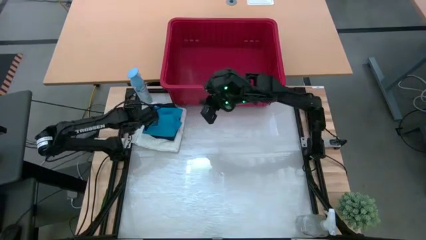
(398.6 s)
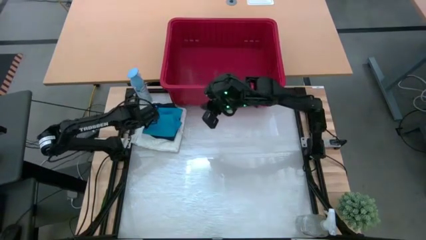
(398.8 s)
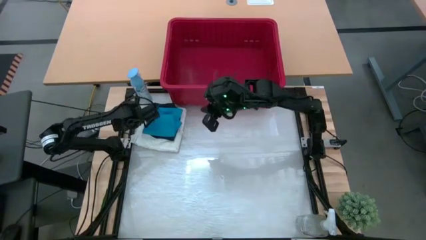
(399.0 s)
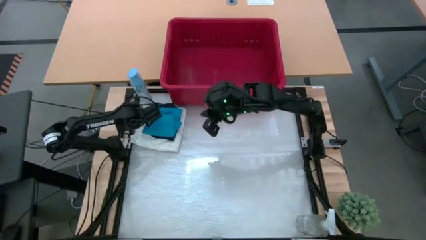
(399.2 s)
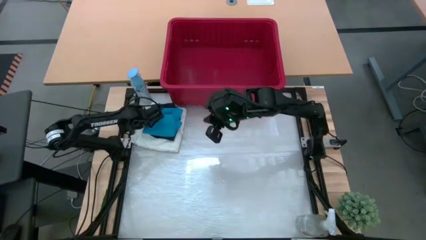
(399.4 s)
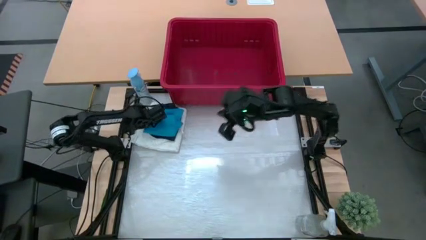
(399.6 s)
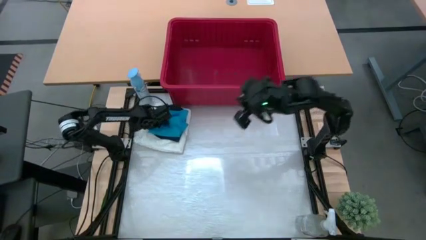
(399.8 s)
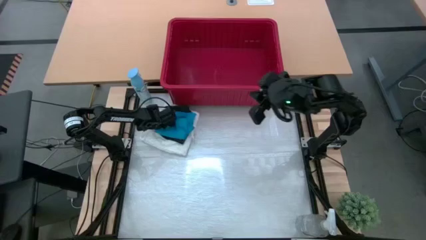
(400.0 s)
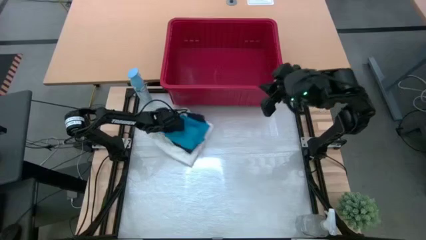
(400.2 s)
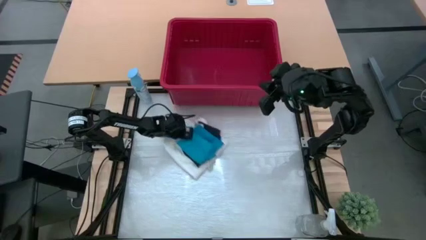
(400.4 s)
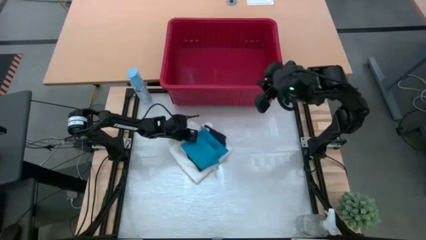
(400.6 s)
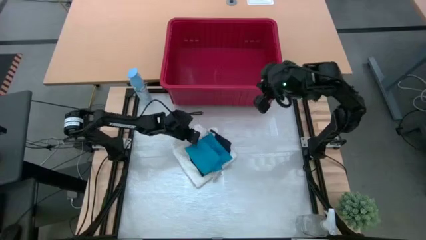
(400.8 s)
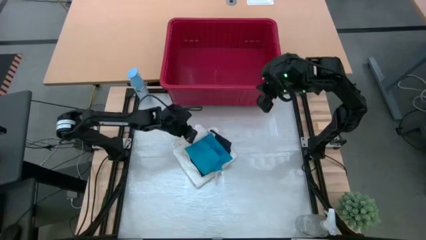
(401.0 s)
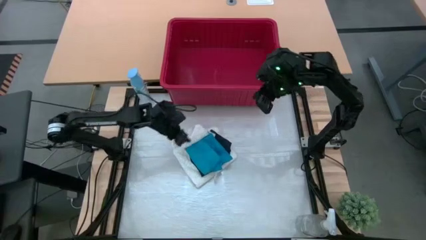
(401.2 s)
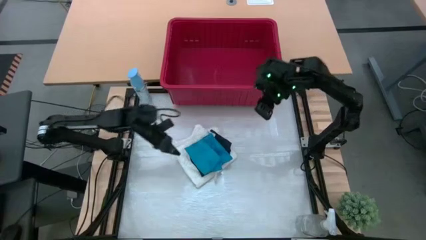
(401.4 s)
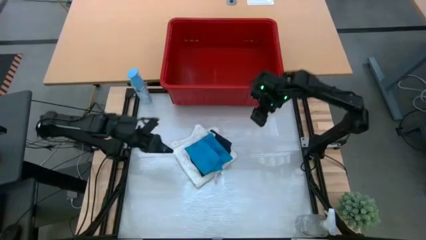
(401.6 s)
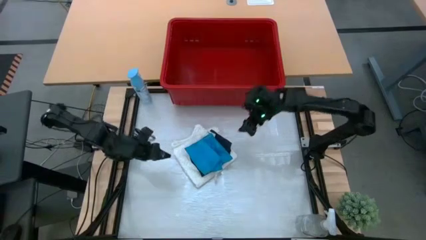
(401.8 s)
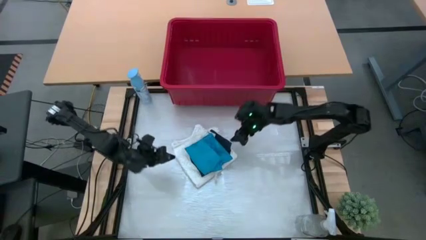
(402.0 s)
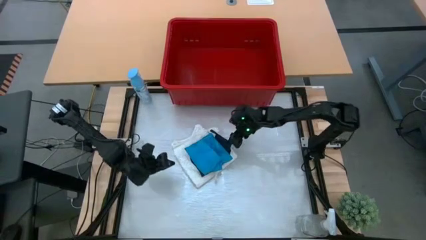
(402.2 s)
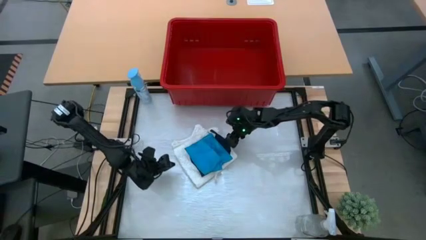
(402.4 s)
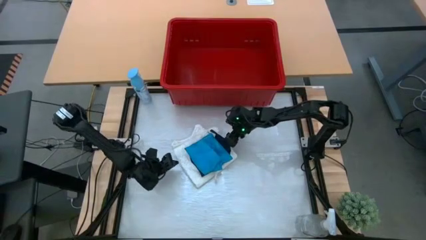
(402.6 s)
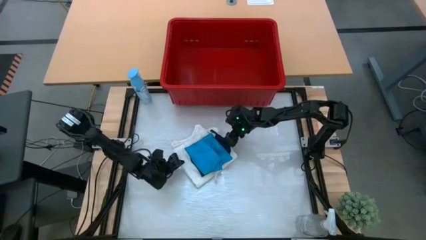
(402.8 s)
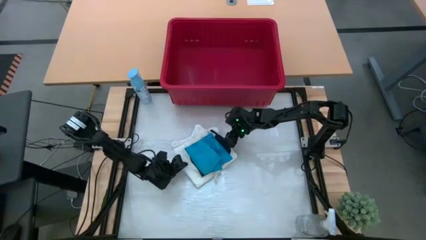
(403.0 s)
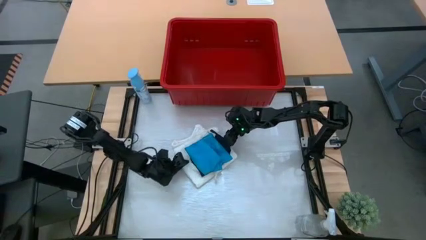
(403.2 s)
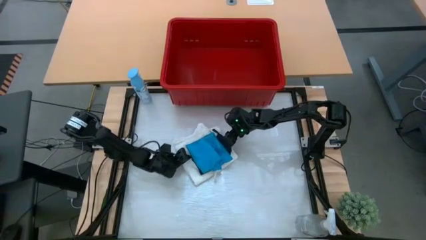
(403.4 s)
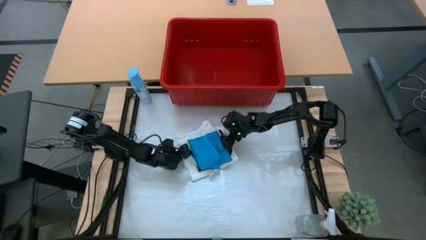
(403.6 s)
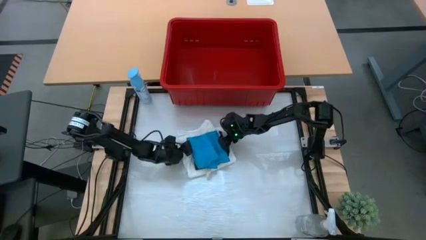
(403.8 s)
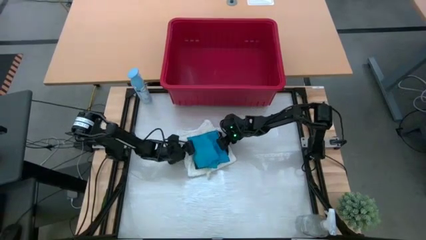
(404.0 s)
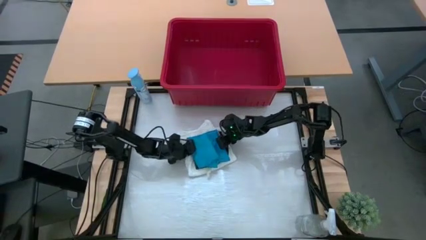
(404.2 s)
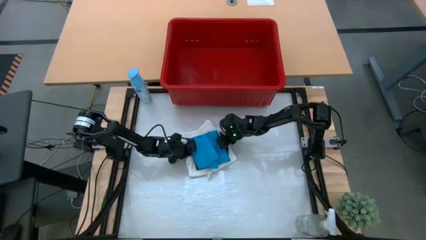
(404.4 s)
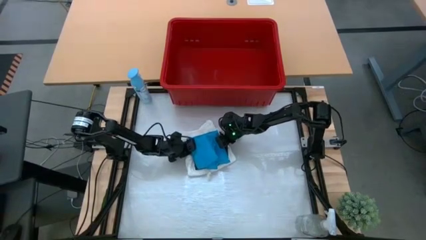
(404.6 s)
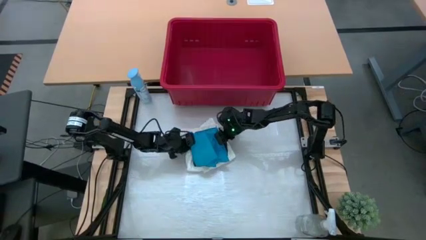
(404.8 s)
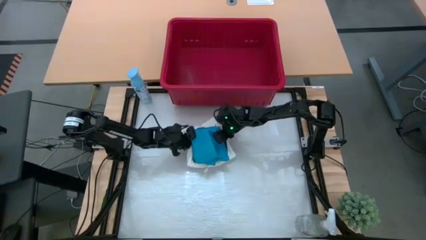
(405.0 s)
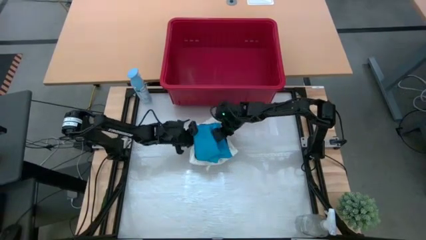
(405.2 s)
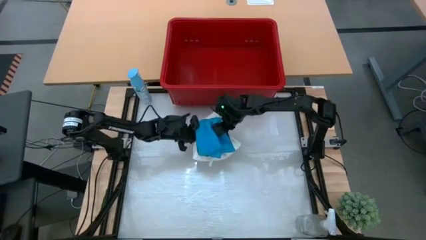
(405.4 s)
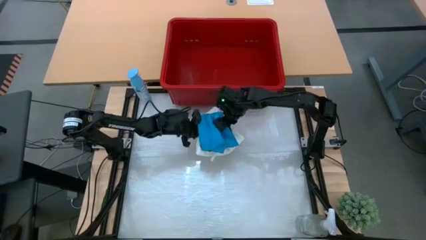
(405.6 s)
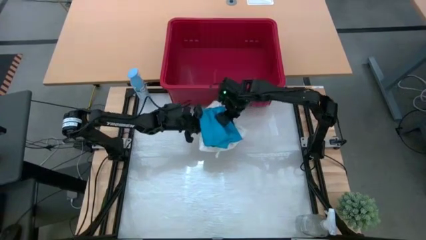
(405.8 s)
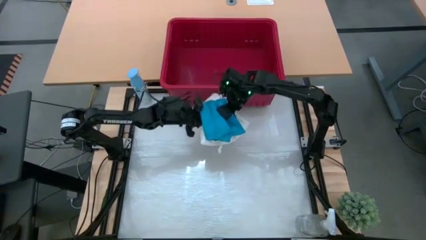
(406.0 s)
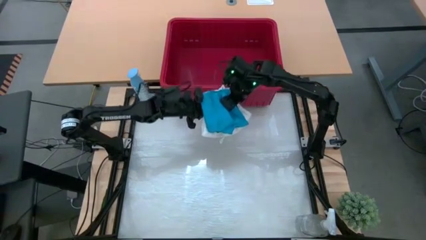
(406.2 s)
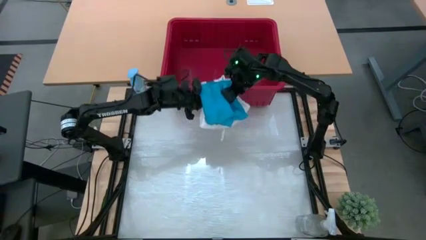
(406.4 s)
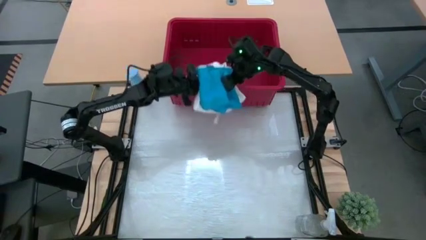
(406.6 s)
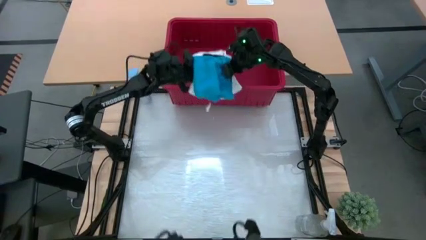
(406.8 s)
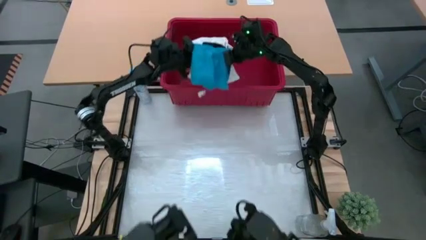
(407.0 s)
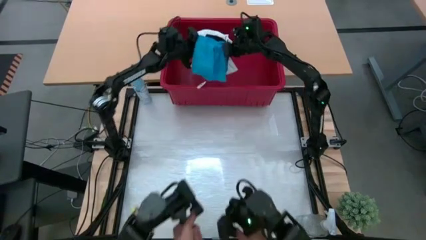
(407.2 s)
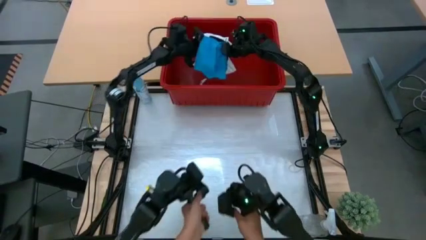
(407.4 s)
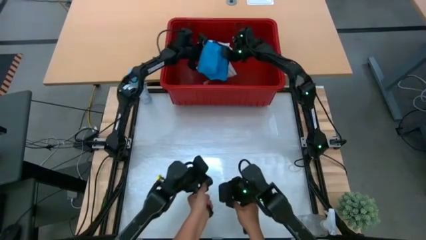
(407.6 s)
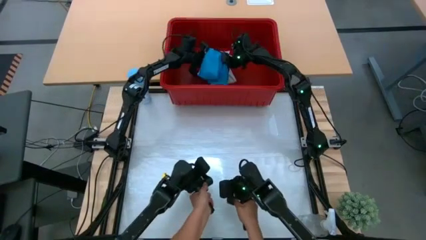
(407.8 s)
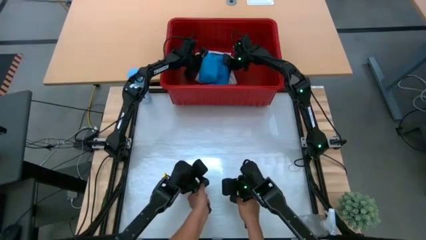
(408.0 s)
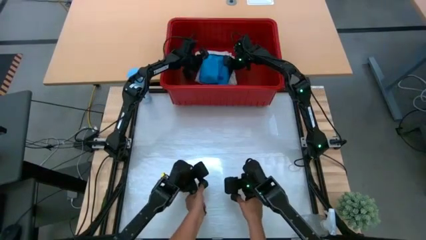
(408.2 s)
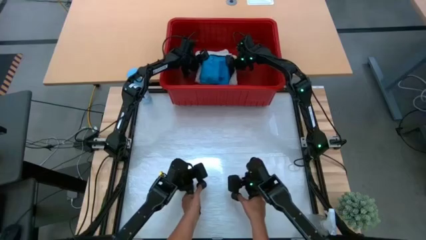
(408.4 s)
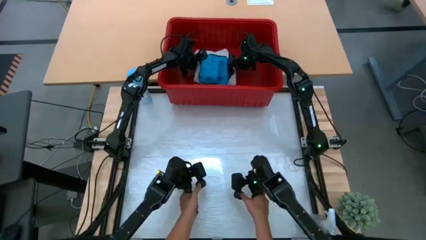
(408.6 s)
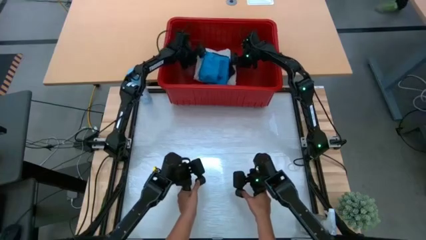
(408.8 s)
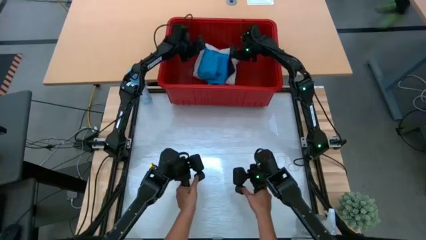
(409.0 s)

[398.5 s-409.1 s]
Task: Fold Laundry from Bin
Put the stacked clothes into the red bin
